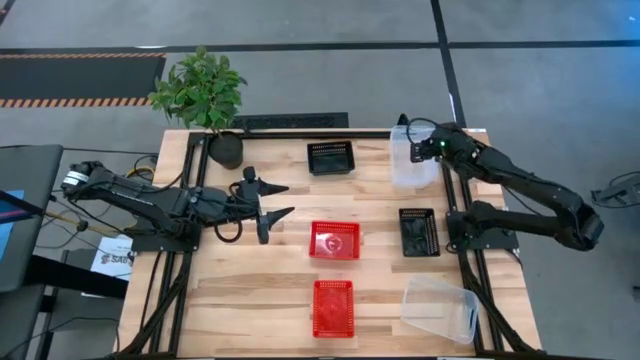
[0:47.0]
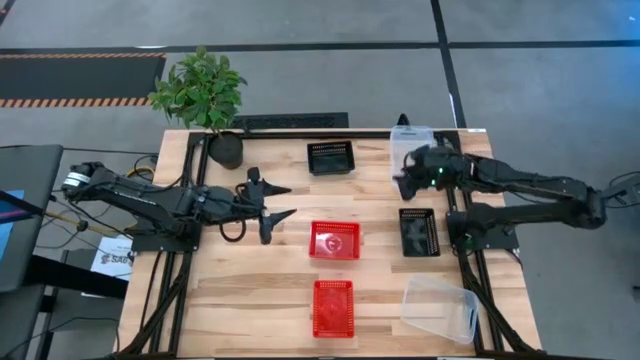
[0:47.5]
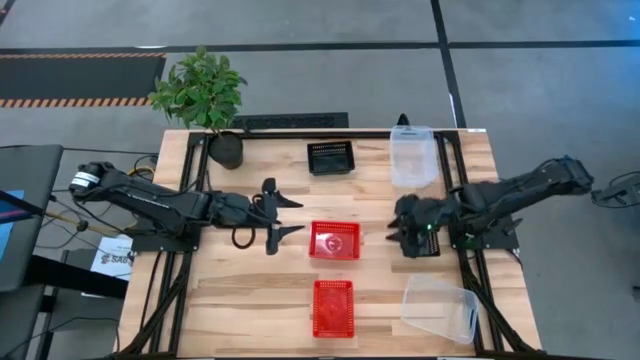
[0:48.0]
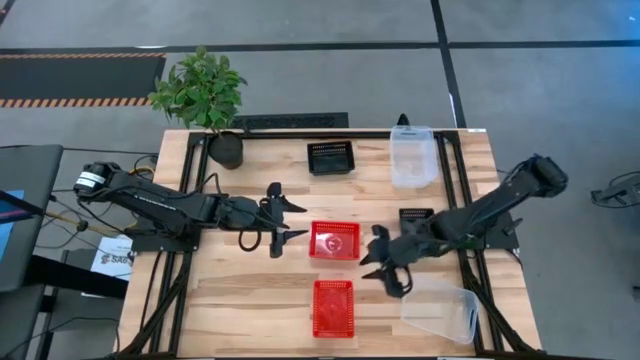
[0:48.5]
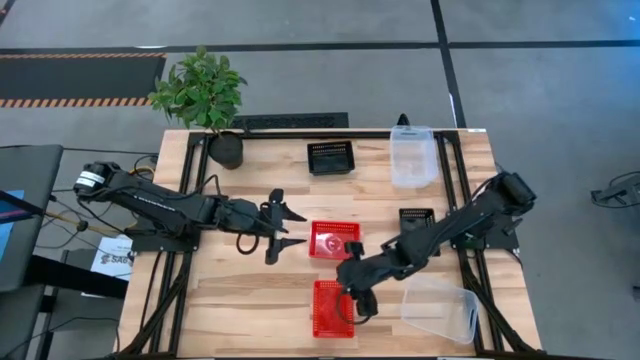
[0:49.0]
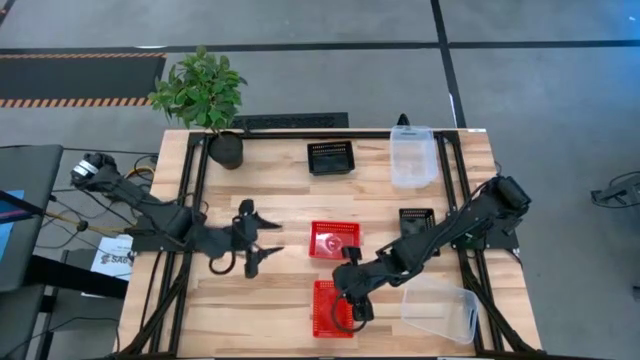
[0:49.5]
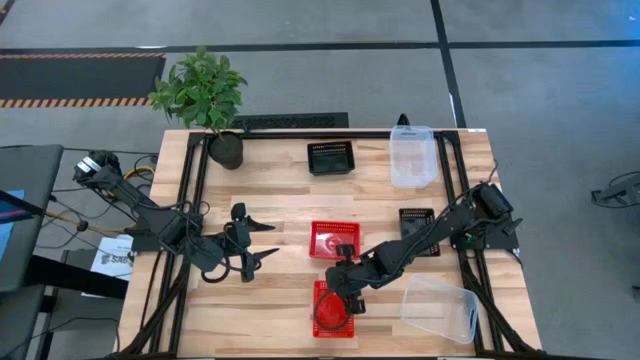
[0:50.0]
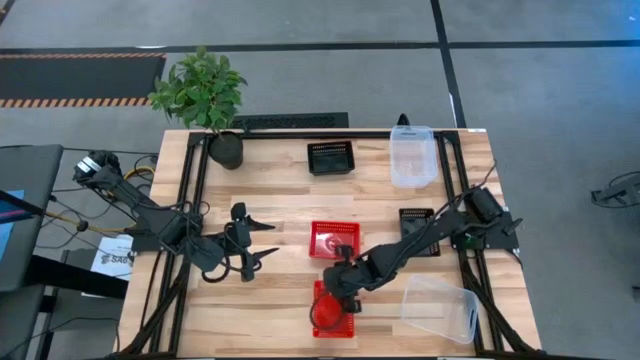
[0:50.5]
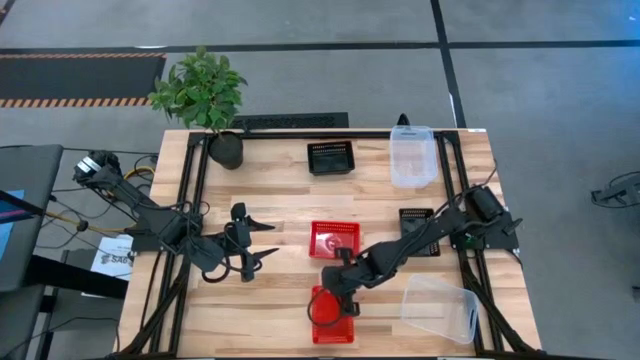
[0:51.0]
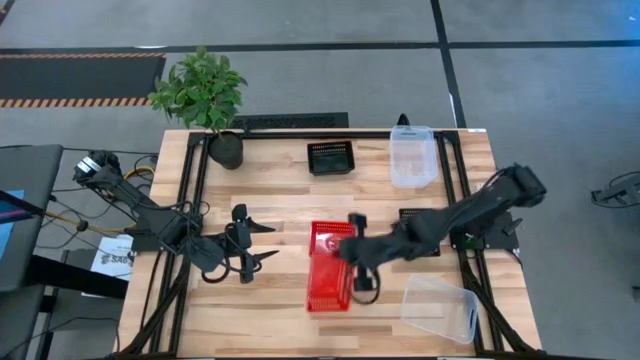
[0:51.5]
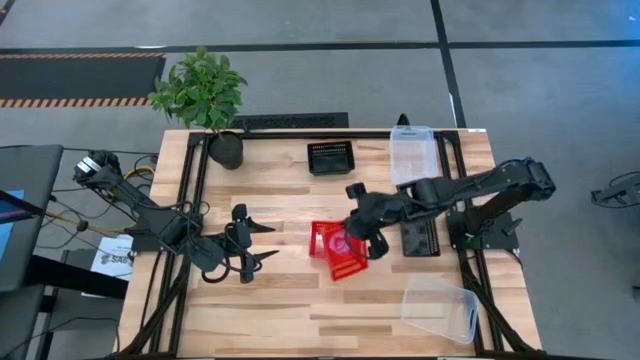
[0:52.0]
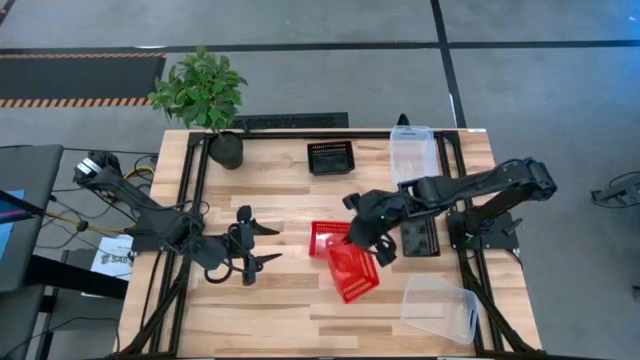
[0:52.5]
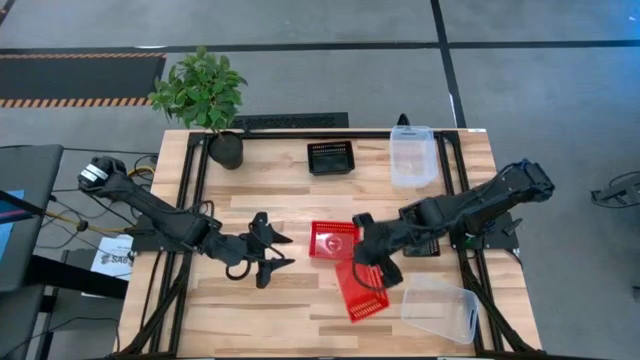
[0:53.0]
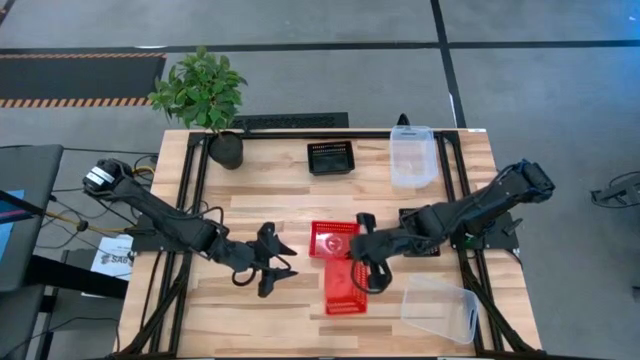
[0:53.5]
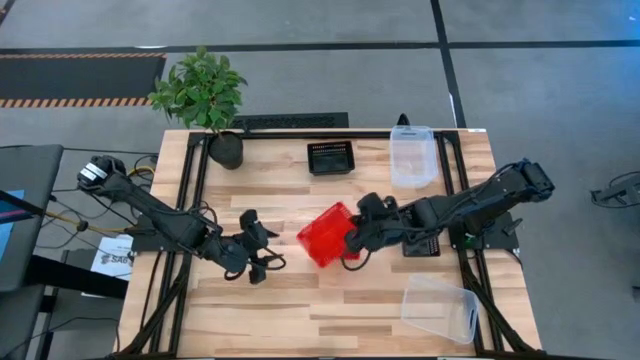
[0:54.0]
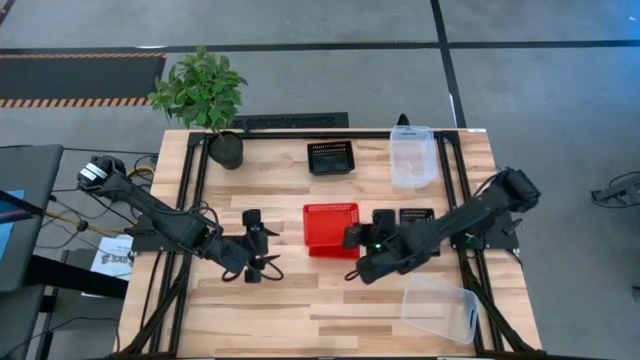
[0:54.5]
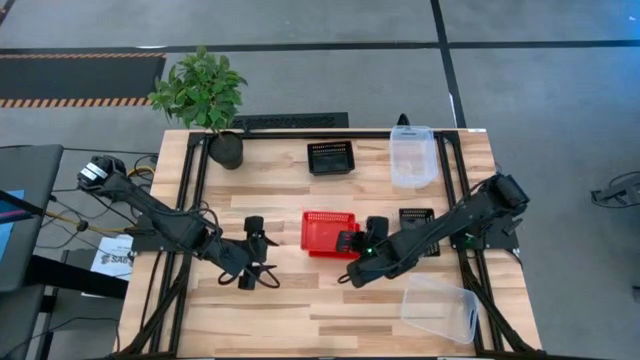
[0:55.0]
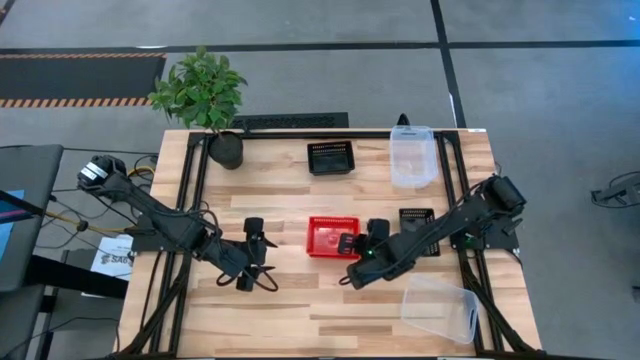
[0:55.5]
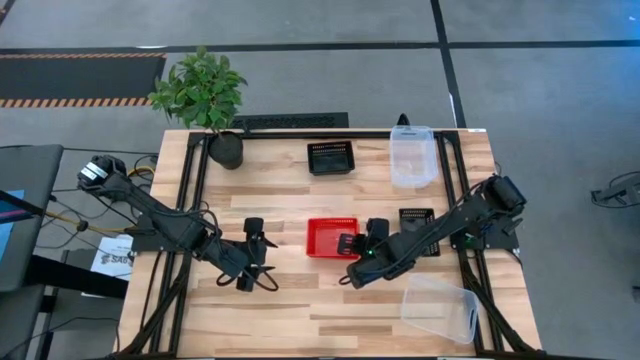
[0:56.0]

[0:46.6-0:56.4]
Stack the bottom red bin on top of the top red bin

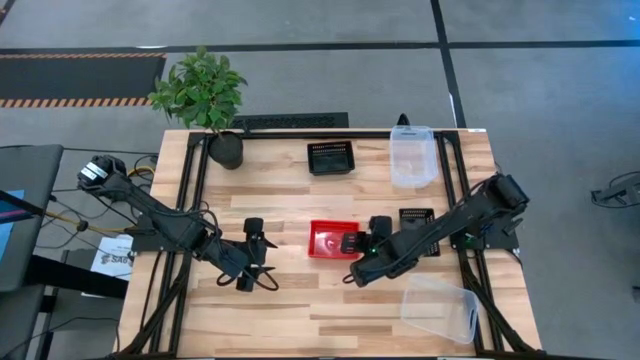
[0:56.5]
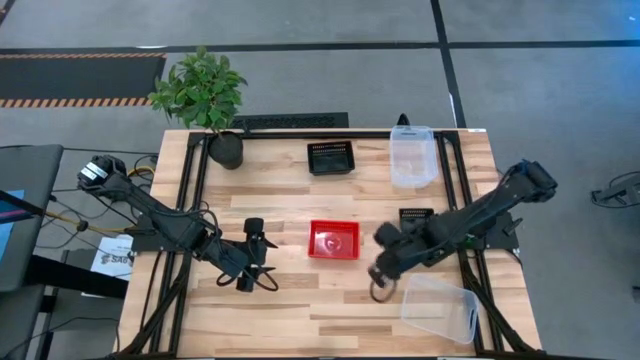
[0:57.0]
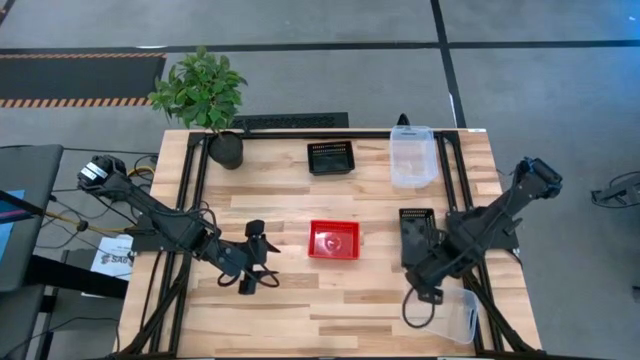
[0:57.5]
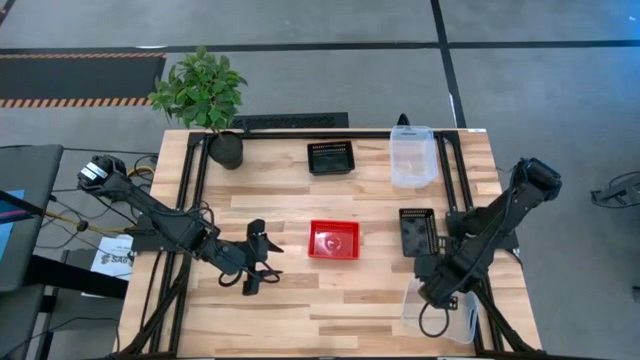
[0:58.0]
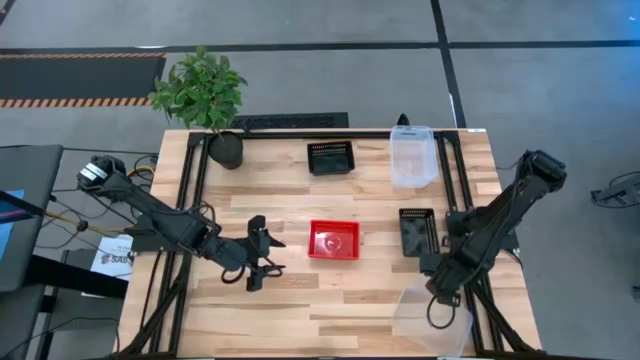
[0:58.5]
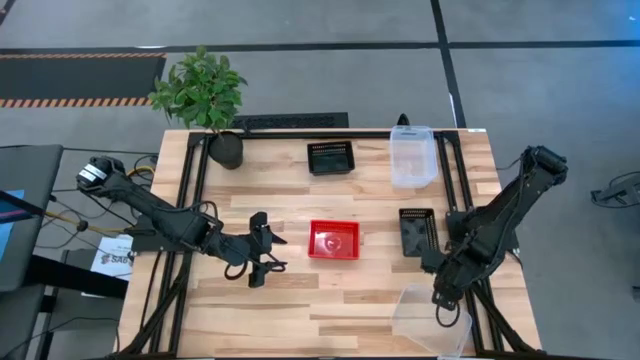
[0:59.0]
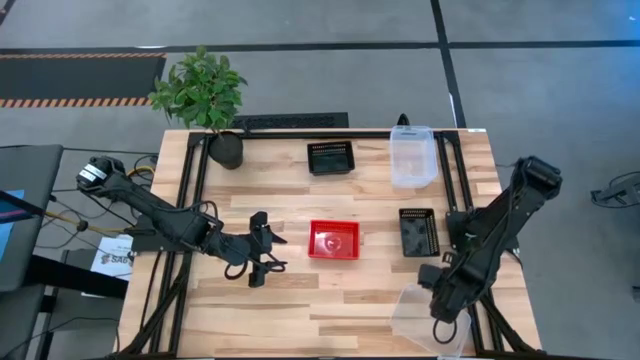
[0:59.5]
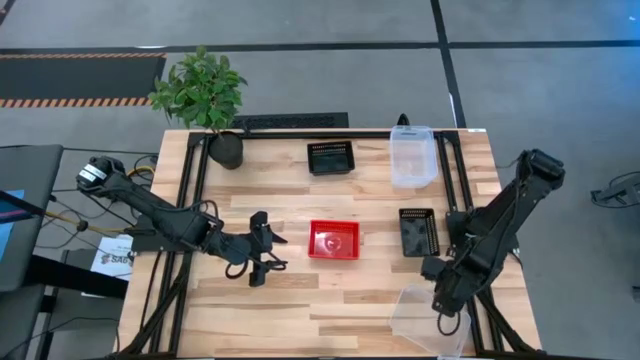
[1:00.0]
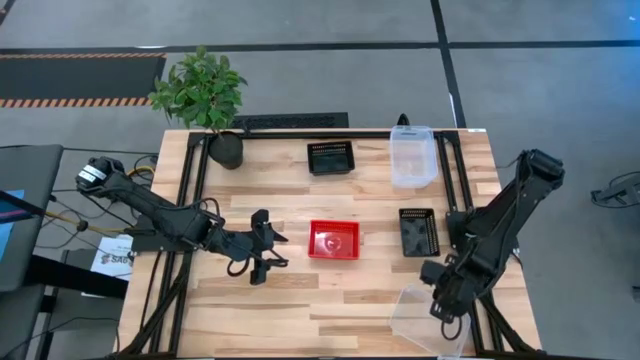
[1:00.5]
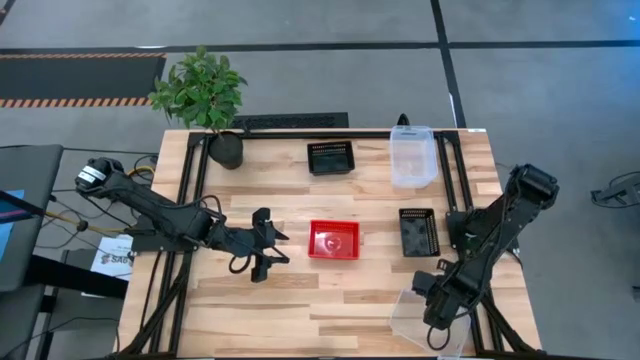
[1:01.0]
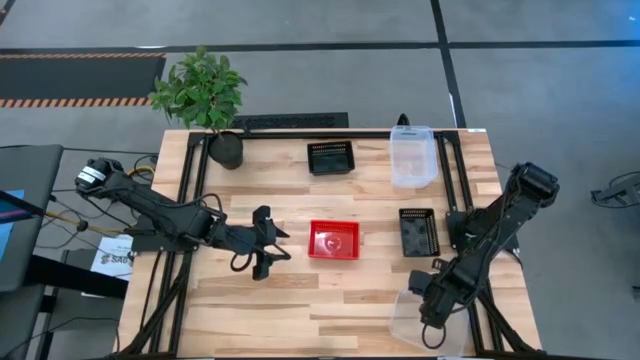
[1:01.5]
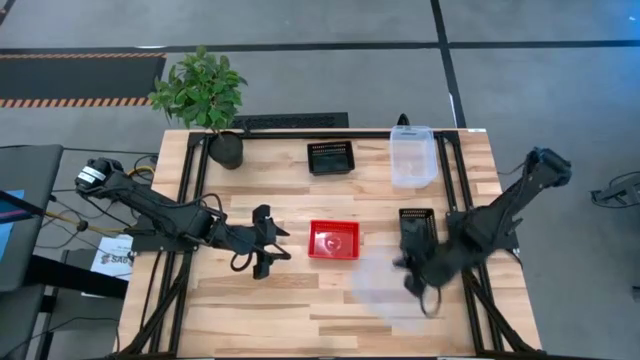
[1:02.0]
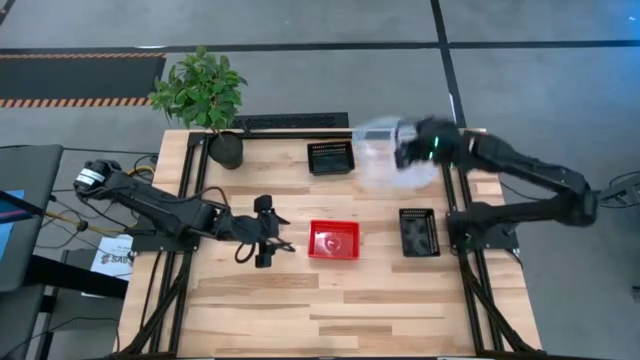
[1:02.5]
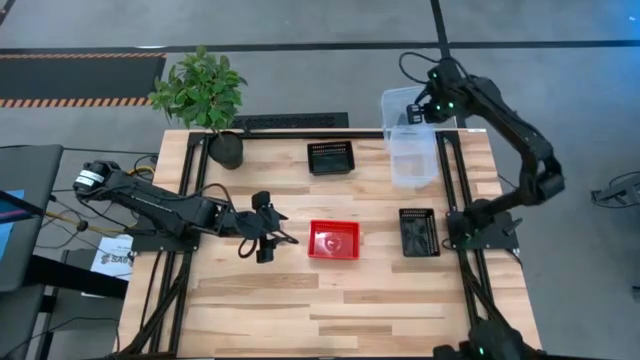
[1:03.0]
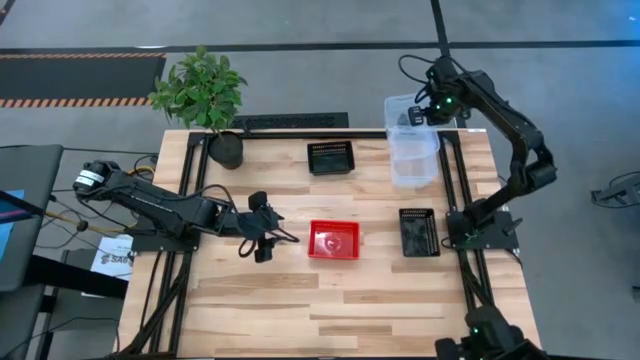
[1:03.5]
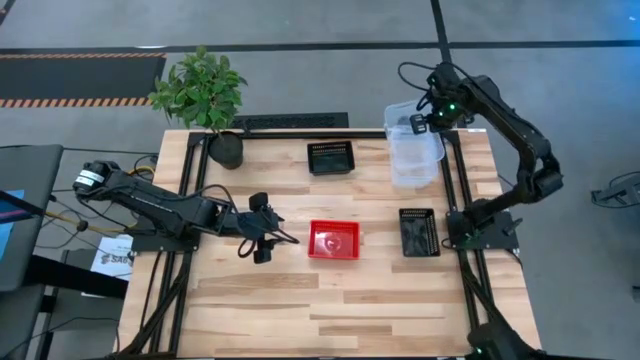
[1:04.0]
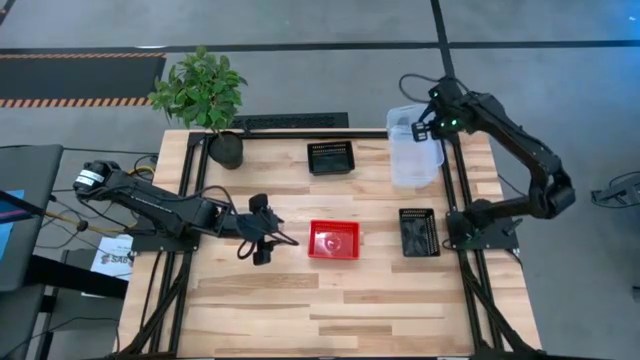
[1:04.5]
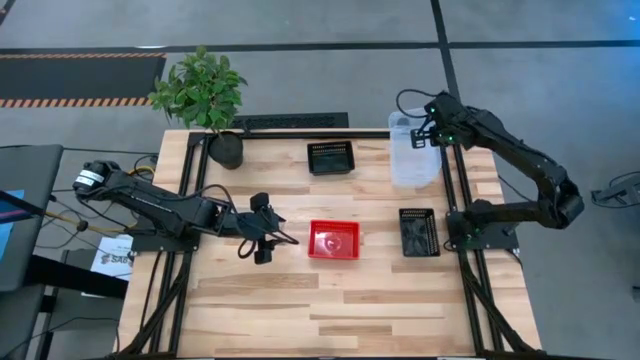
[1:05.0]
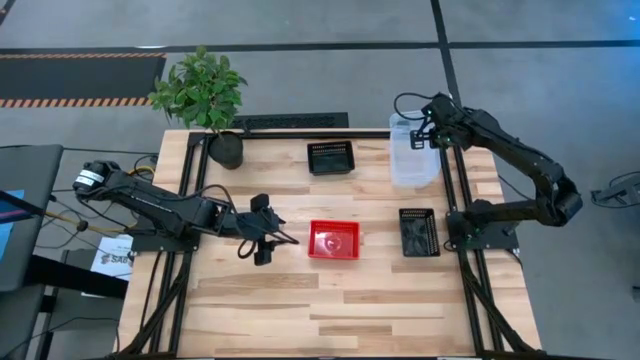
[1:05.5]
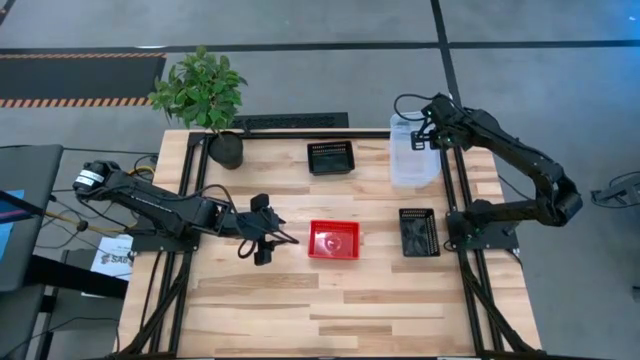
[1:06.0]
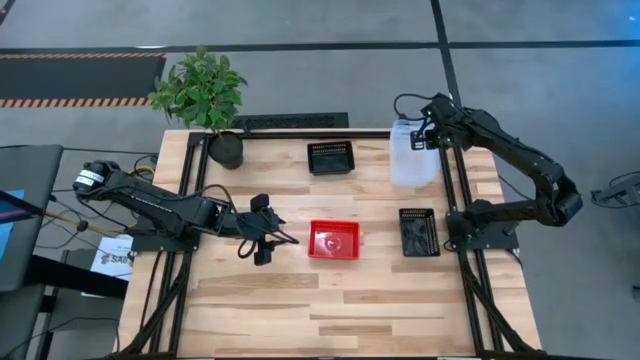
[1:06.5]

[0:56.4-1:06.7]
Stack the bottom transparent bin on top of the top transparent bin
